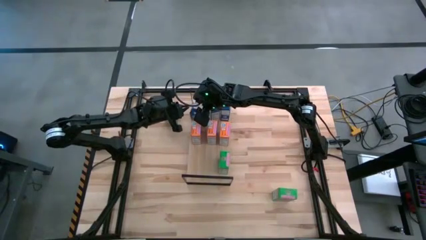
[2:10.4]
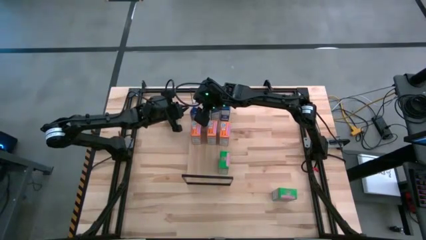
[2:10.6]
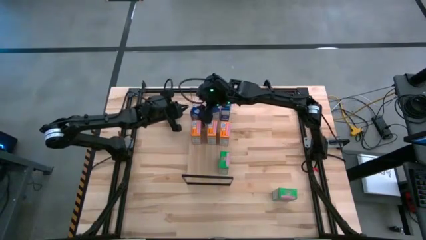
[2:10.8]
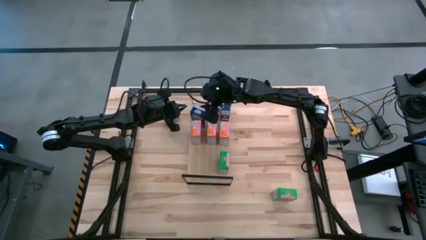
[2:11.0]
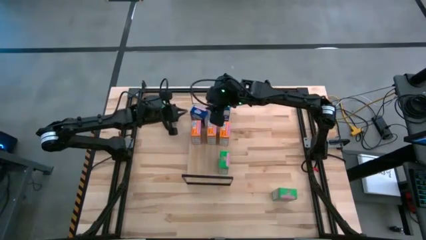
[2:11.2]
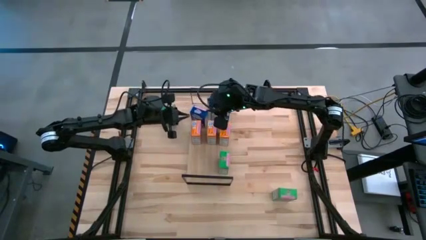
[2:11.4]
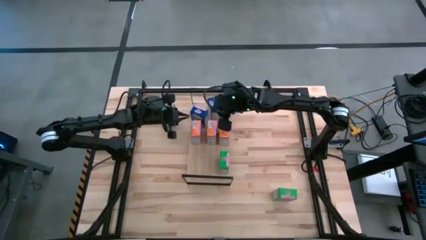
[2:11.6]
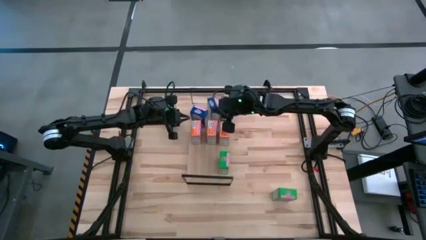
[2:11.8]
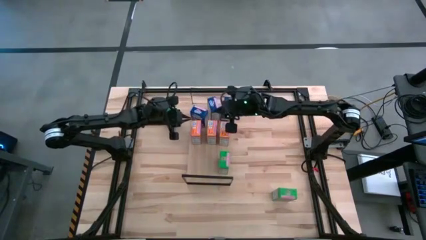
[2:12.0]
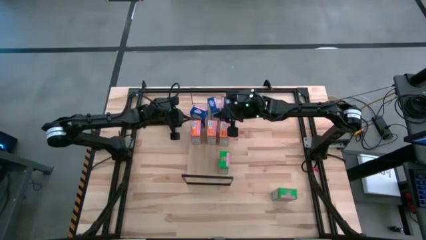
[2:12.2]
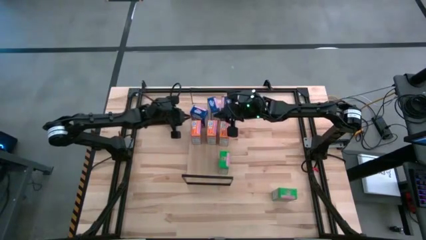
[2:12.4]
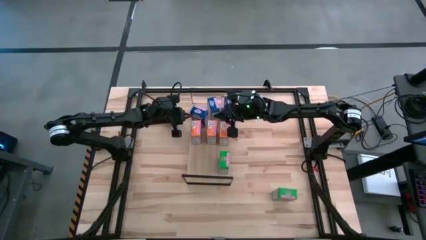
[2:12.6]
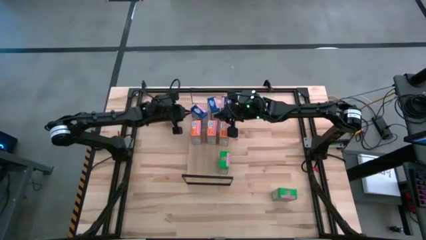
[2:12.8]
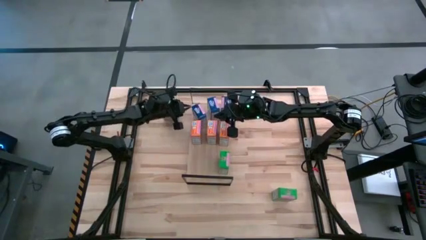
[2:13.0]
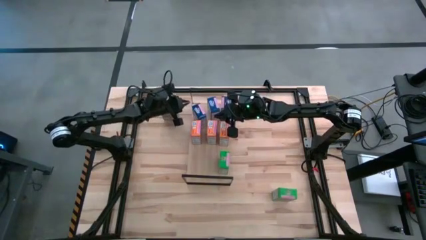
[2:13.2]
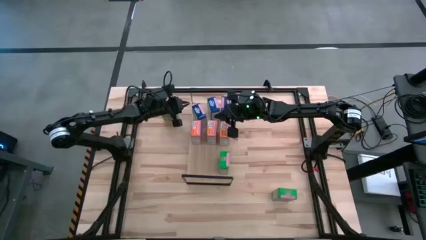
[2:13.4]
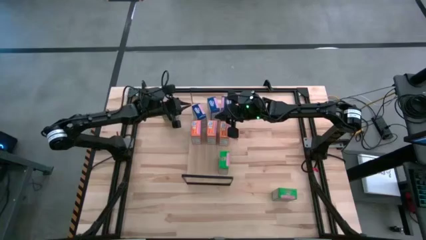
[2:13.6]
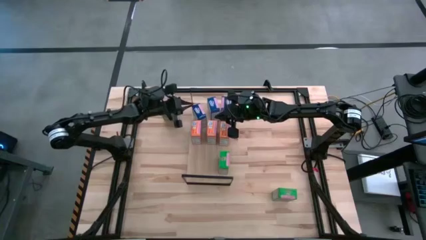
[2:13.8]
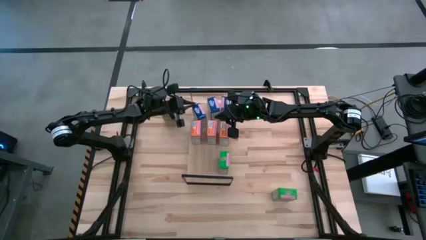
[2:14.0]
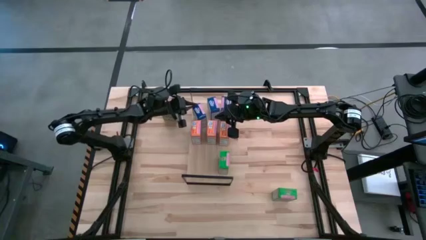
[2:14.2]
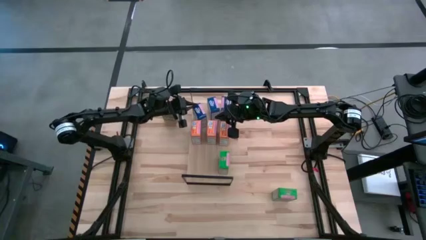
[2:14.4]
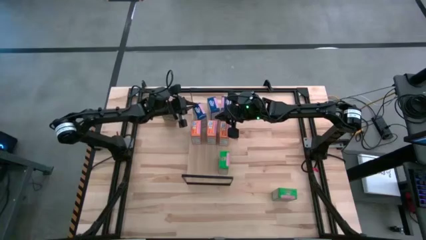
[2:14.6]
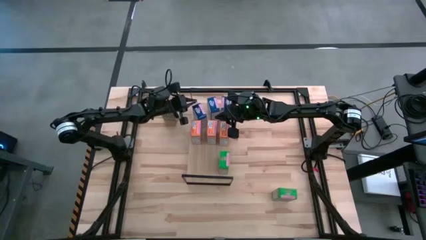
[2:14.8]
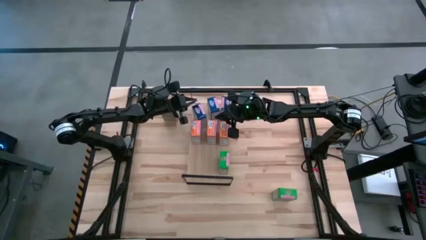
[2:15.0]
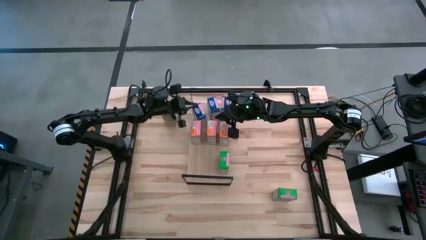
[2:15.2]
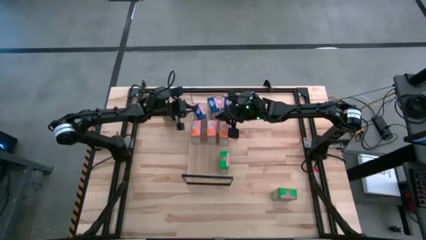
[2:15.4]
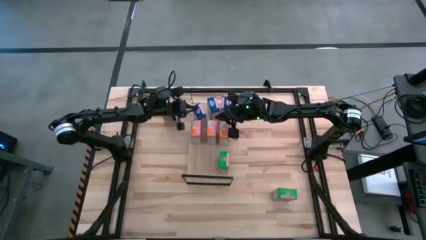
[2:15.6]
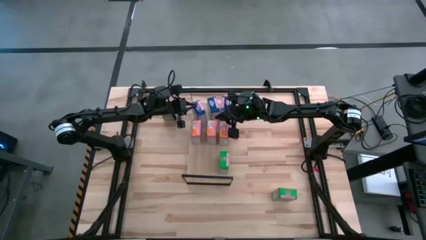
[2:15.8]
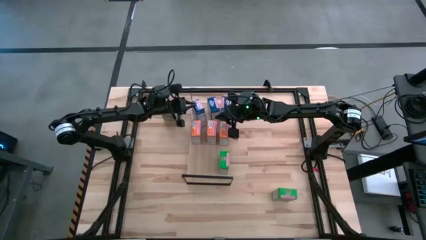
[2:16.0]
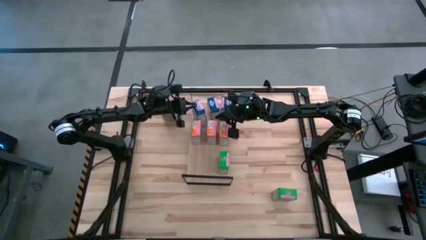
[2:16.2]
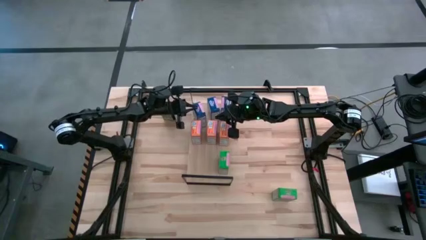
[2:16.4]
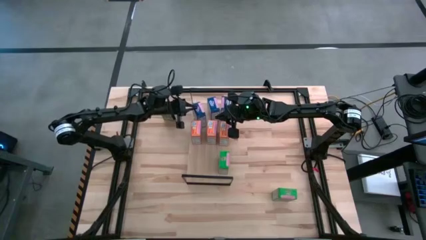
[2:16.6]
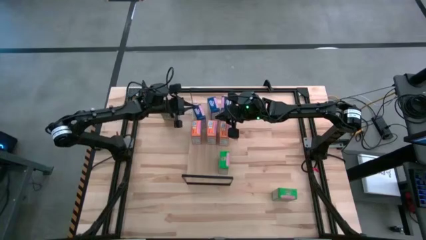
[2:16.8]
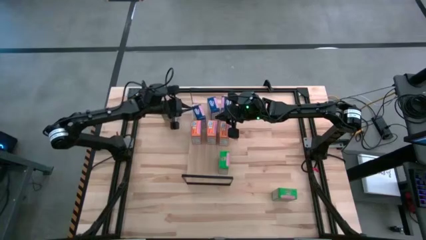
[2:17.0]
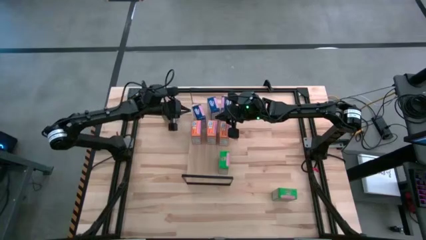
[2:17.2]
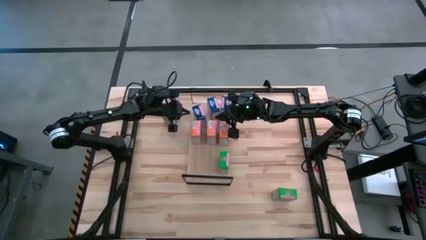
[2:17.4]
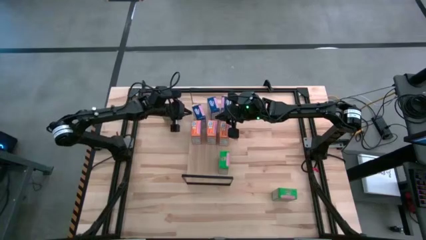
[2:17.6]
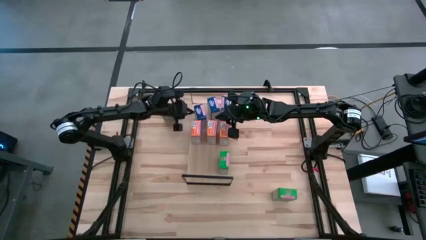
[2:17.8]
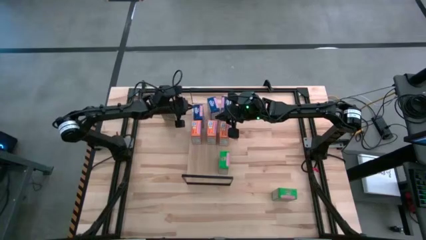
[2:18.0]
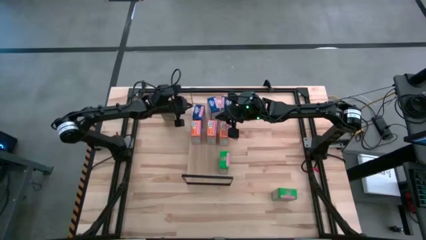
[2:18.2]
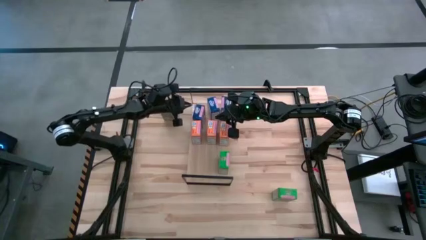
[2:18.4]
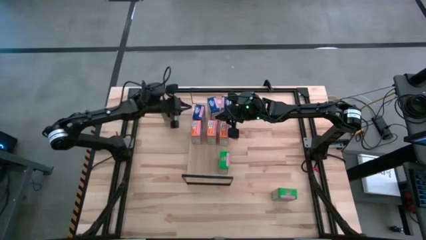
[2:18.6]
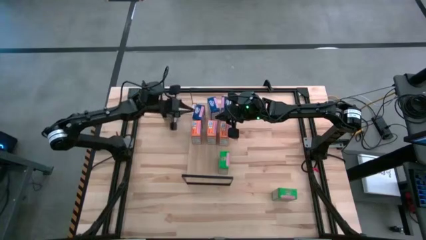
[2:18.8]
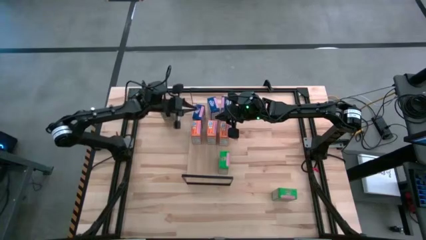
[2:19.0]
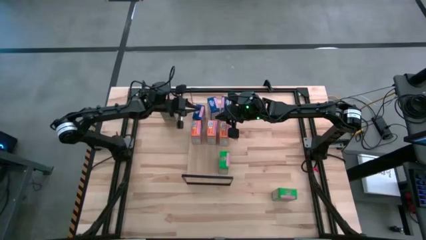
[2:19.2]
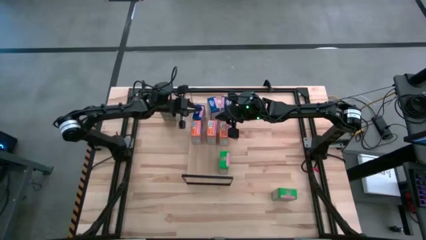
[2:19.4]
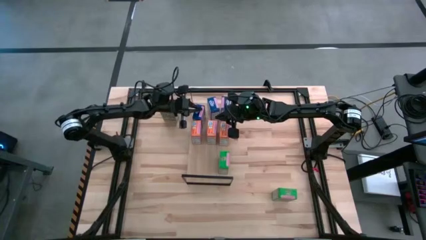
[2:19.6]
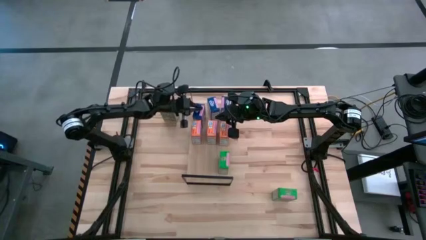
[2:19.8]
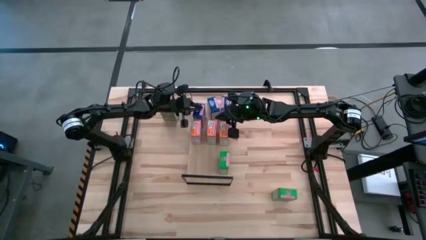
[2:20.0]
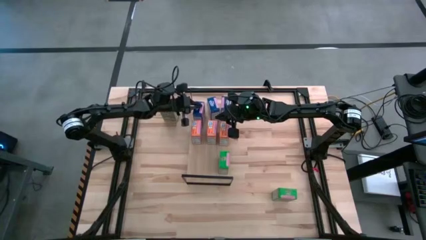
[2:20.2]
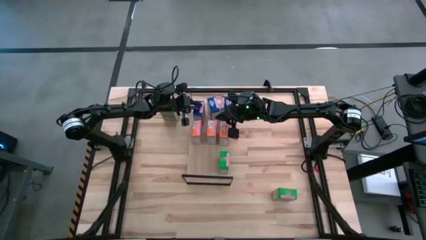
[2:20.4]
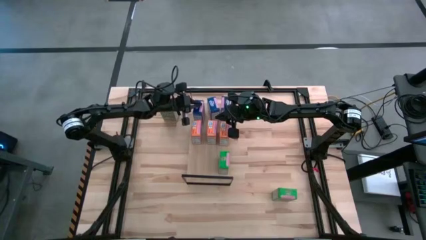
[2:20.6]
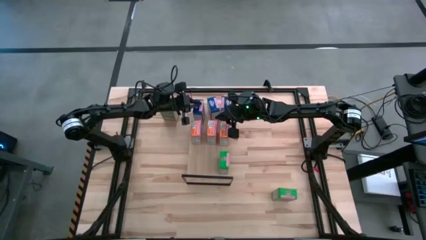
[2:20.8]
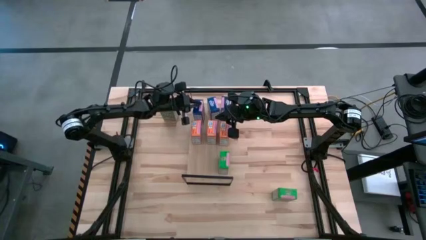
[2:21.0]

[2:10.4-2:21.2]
Task: Stack cereal on shelf
Put the blue cereal box on the shelf aligned with the other blue cereal boxes

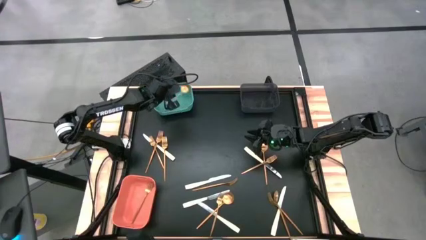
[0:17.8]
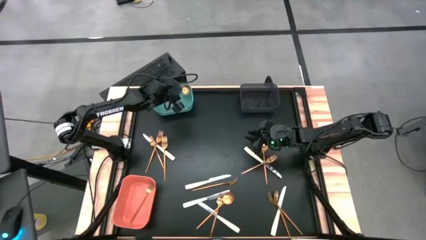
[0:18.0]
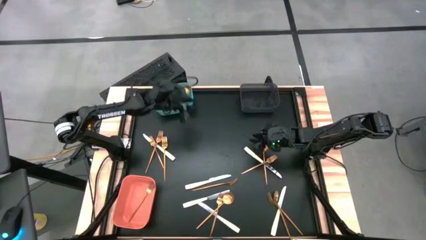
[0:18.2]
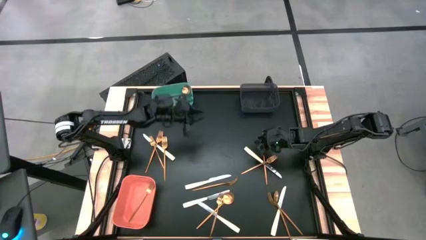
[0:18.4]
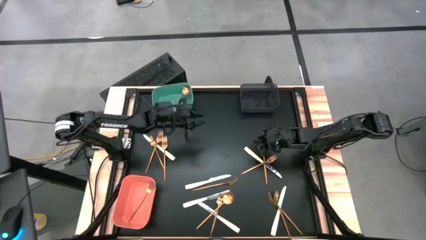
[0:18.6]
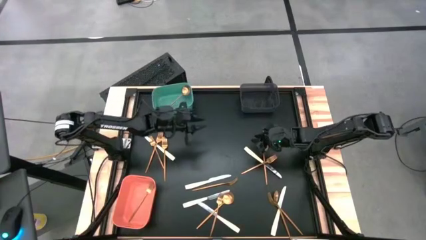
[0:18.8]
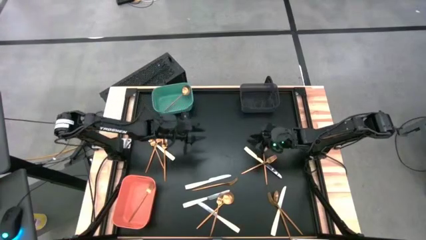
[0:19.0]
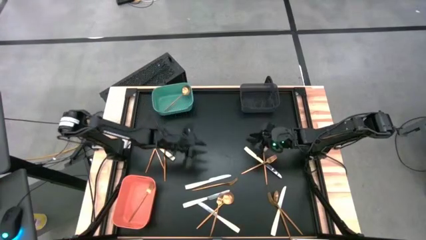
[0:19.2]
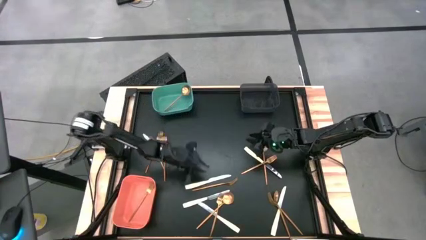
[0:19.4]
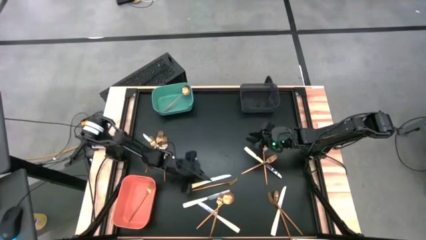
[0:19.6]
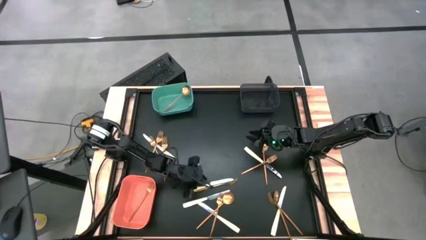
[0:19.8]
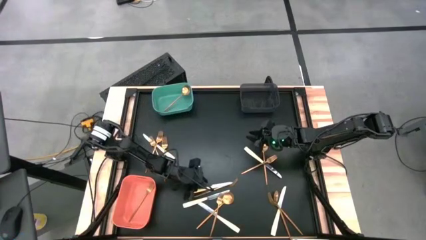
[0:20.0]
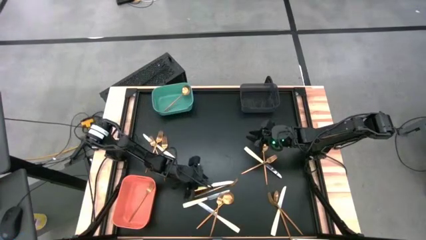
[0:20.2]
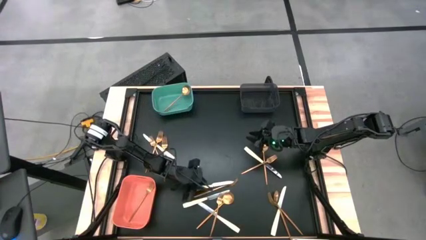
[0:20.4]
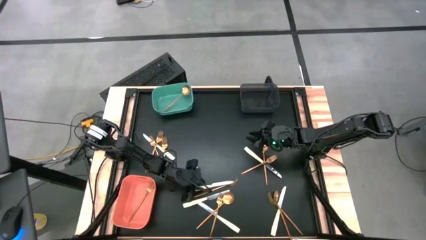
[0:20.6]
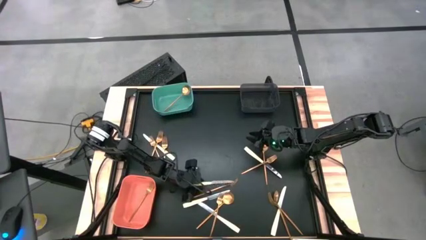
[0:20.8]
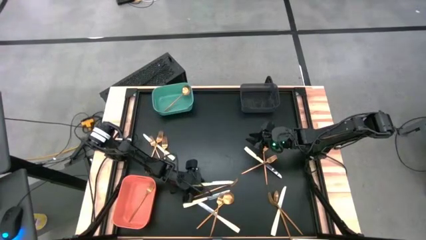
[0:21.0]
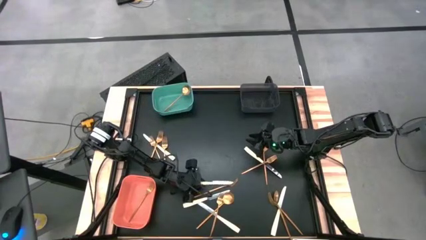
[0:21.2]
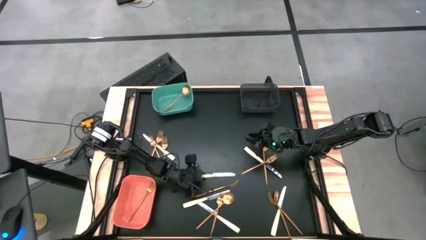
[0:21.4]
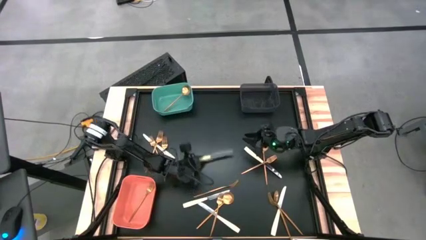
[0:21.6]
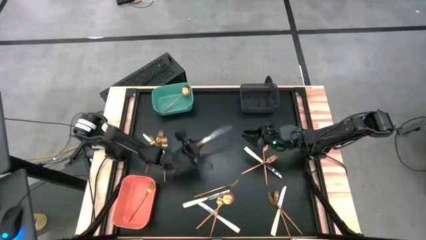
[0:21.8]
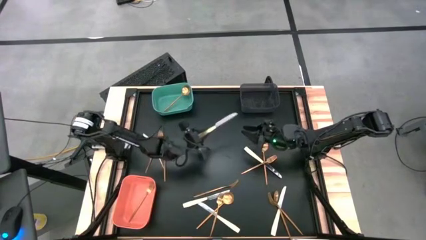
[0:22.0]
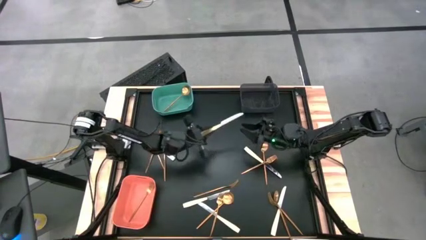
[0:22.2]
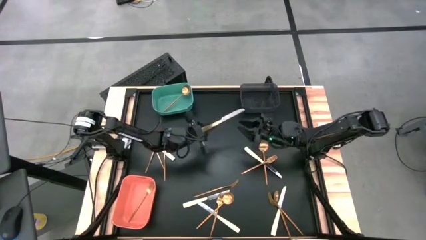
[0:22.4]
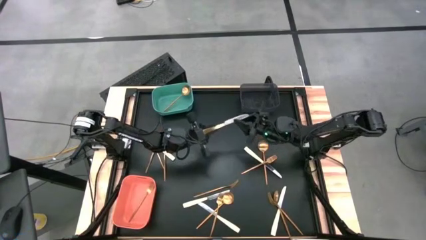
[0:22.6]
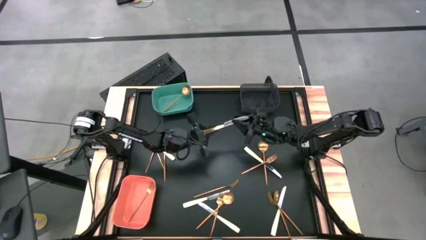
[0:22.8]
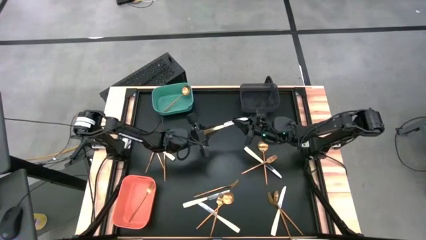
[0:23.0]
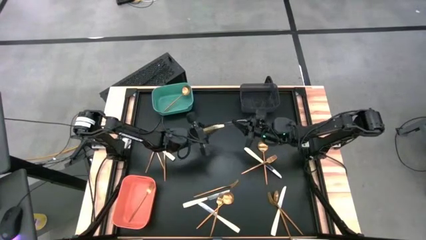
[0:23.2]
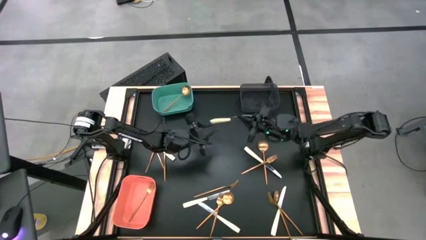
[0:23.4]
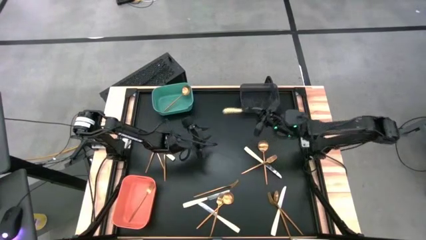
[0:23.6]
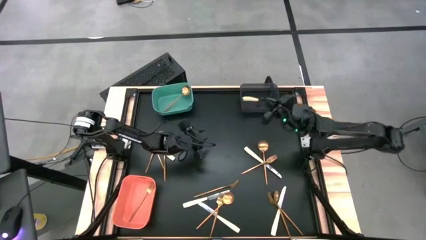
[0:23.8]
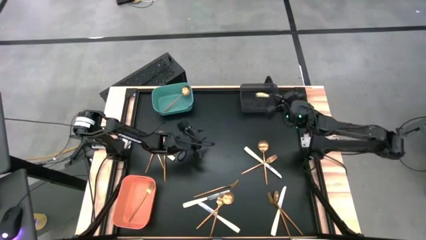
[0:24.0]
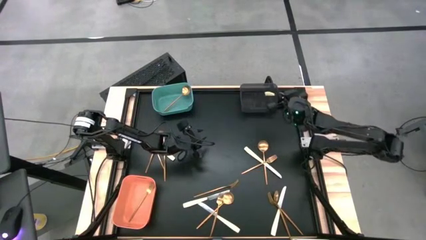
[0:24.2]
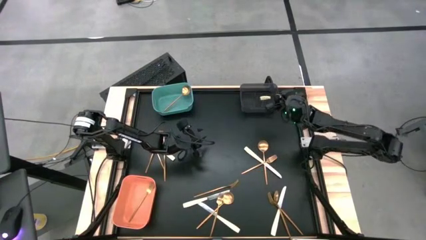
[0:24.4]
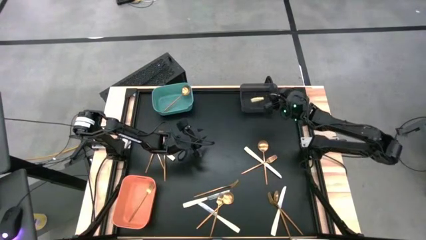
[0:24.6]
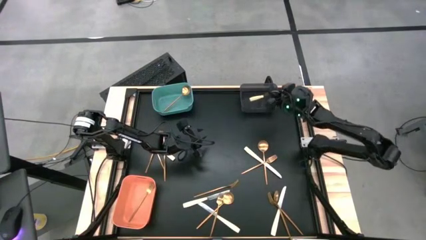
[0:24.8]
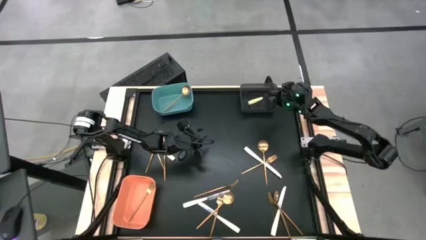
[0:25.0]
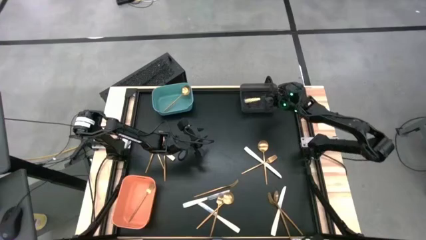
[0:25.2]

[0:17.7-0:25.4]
Task: Sort silverware by color (type)
Put the yellow knife into the black bin
